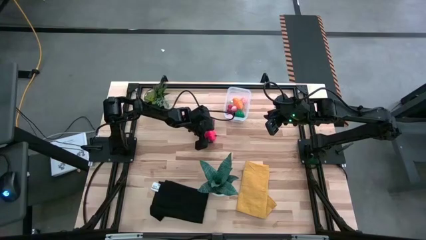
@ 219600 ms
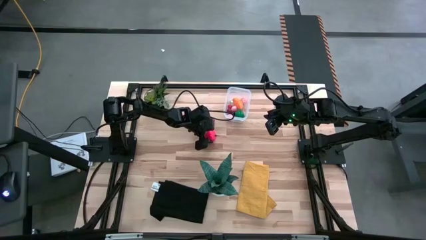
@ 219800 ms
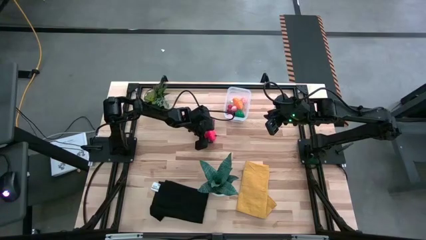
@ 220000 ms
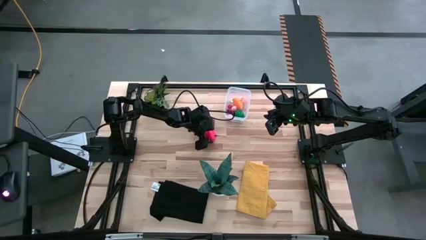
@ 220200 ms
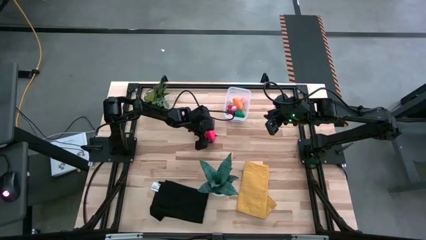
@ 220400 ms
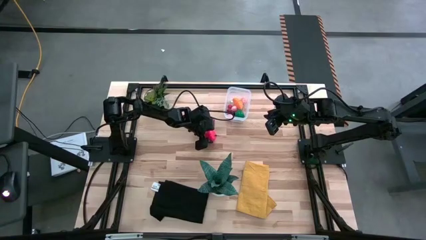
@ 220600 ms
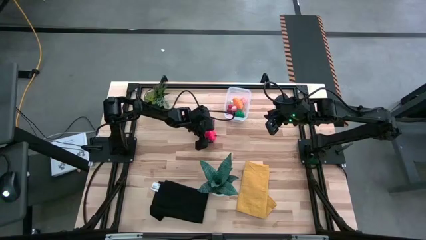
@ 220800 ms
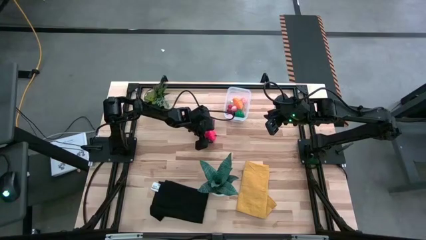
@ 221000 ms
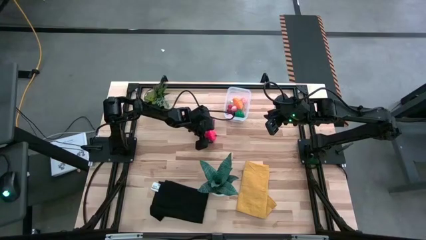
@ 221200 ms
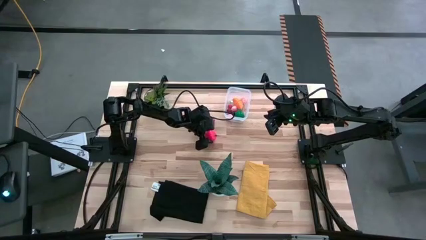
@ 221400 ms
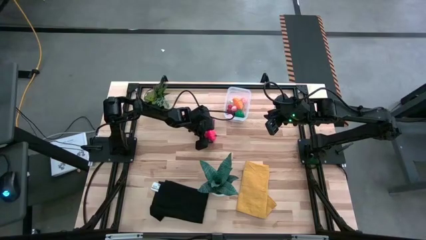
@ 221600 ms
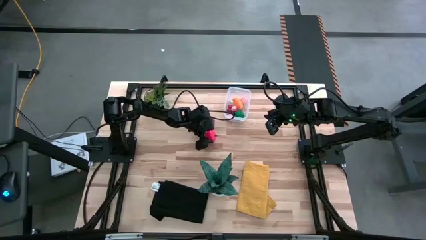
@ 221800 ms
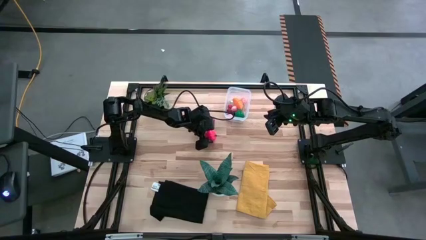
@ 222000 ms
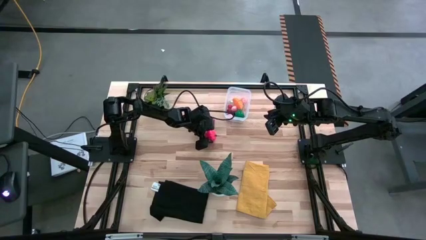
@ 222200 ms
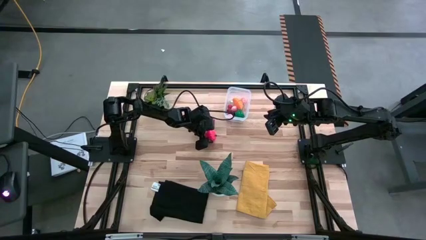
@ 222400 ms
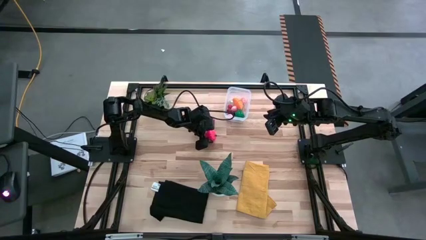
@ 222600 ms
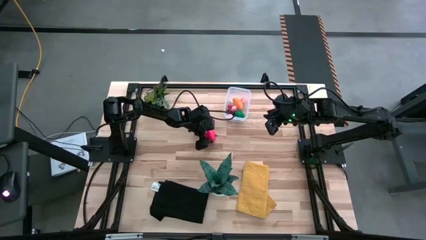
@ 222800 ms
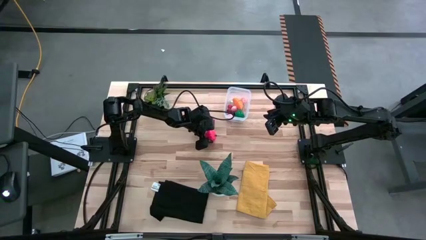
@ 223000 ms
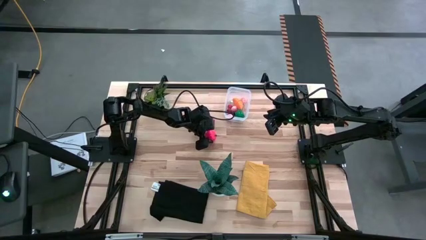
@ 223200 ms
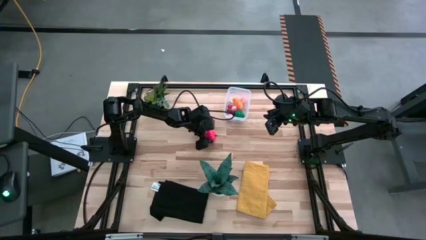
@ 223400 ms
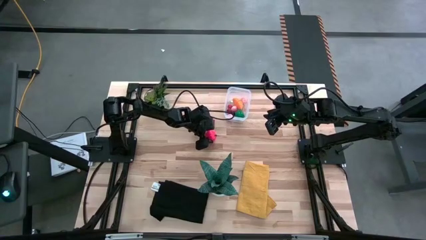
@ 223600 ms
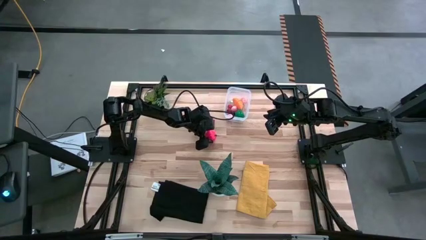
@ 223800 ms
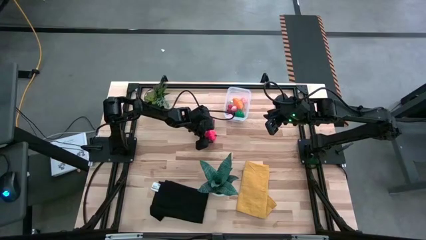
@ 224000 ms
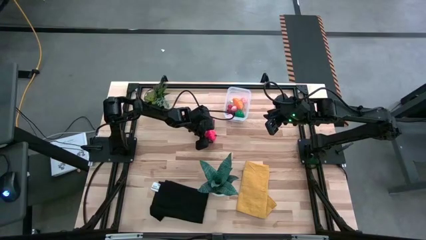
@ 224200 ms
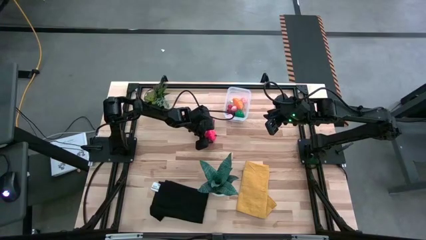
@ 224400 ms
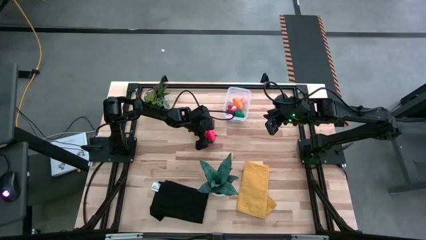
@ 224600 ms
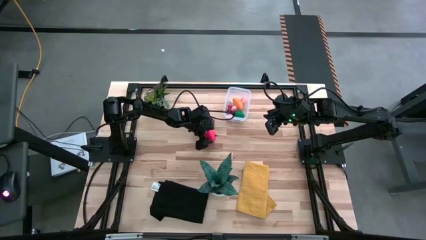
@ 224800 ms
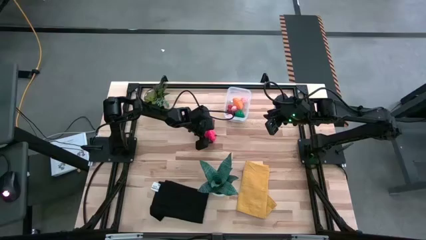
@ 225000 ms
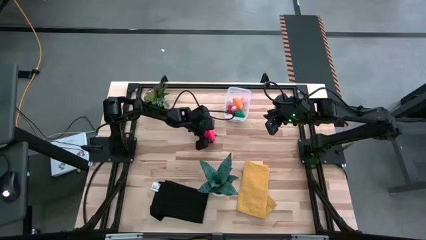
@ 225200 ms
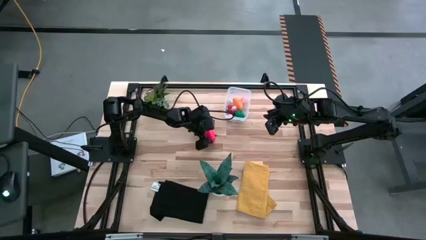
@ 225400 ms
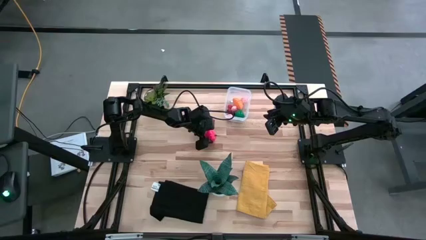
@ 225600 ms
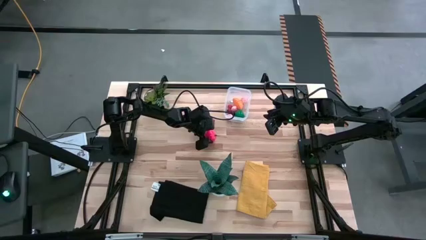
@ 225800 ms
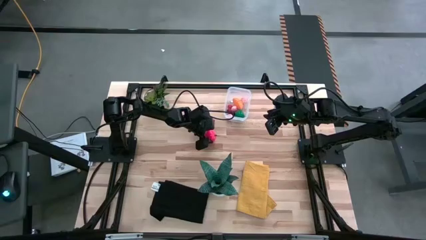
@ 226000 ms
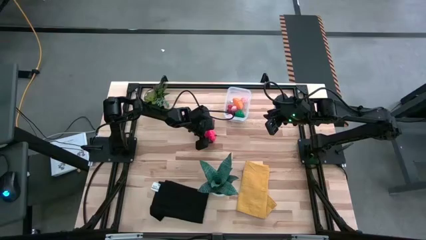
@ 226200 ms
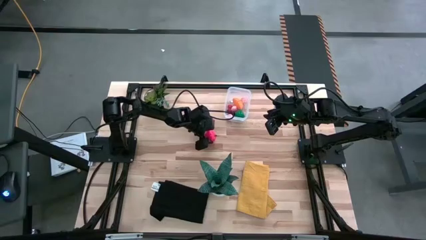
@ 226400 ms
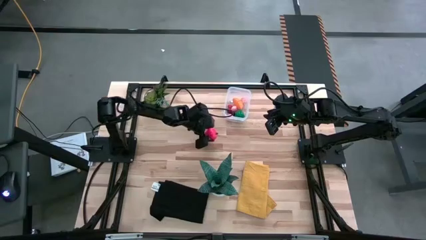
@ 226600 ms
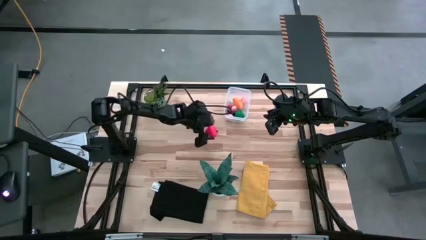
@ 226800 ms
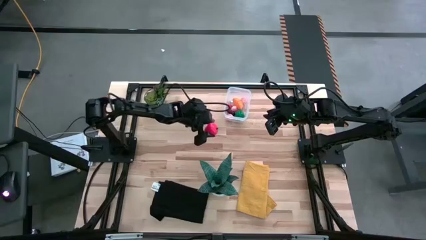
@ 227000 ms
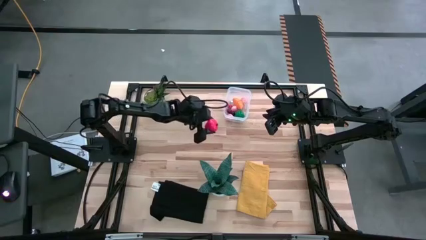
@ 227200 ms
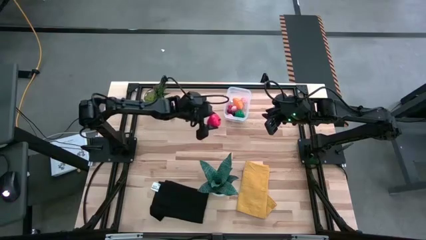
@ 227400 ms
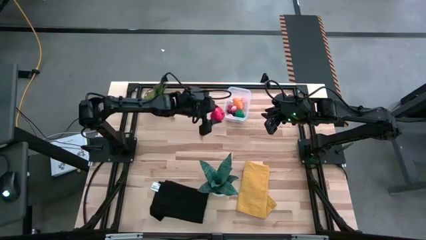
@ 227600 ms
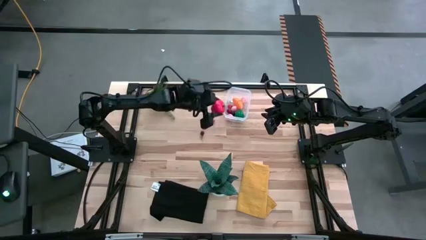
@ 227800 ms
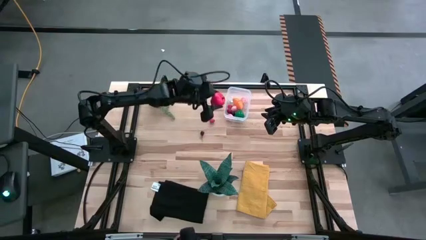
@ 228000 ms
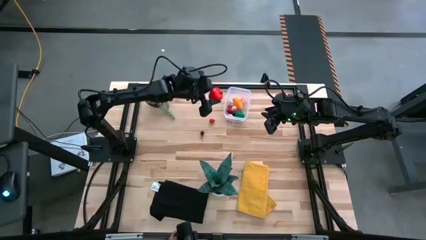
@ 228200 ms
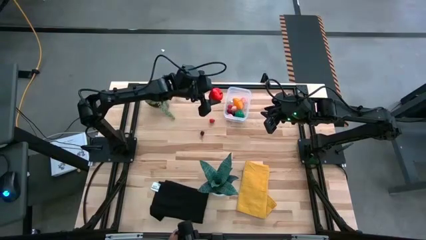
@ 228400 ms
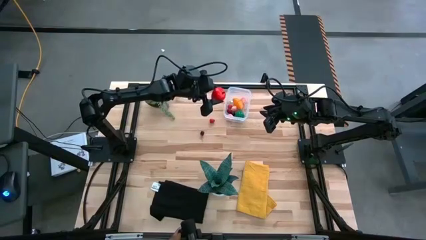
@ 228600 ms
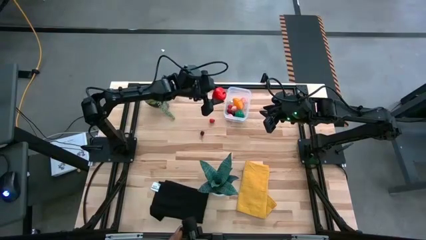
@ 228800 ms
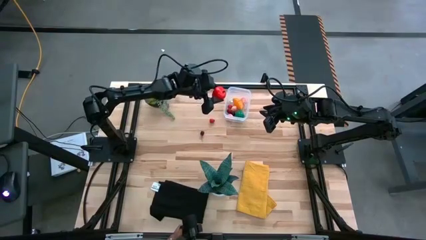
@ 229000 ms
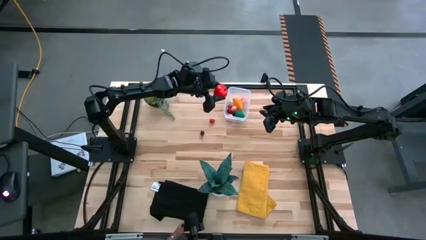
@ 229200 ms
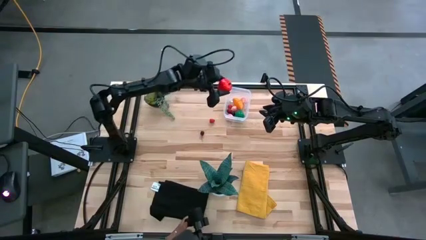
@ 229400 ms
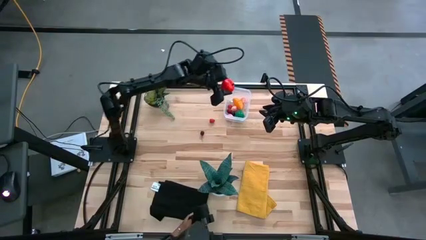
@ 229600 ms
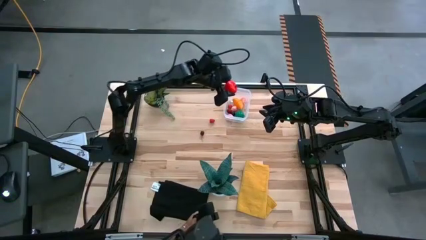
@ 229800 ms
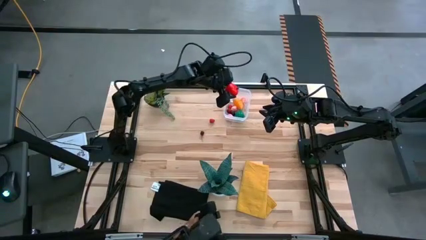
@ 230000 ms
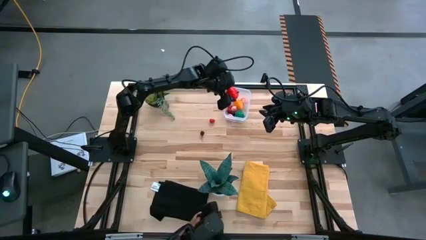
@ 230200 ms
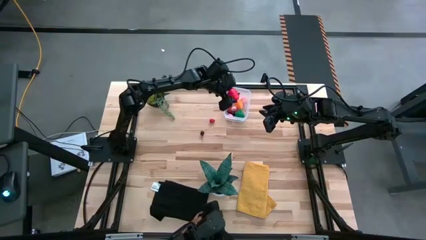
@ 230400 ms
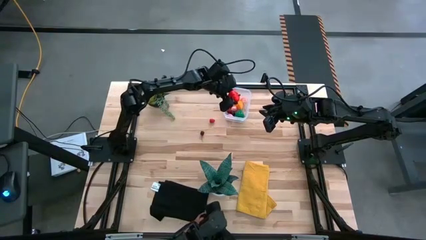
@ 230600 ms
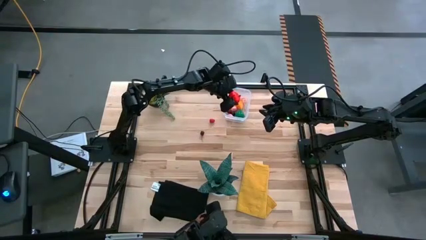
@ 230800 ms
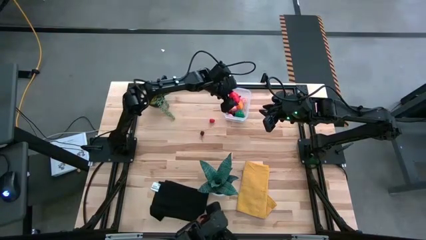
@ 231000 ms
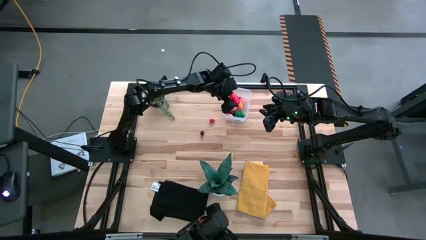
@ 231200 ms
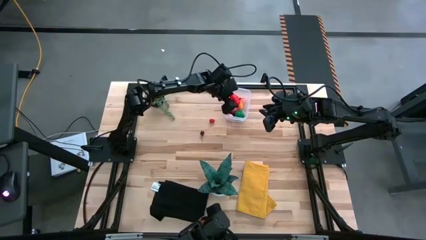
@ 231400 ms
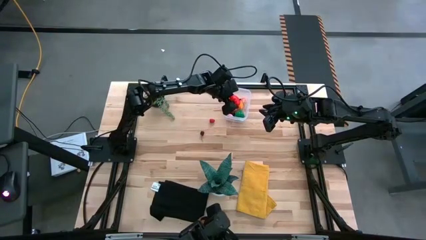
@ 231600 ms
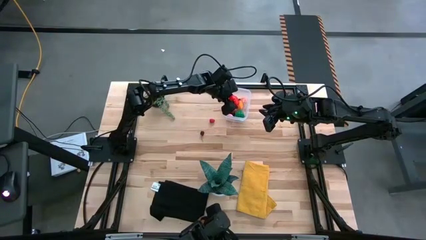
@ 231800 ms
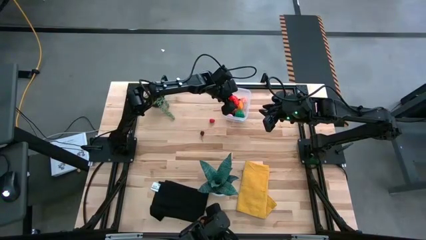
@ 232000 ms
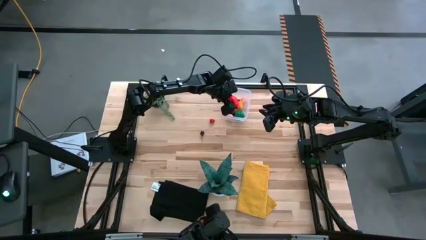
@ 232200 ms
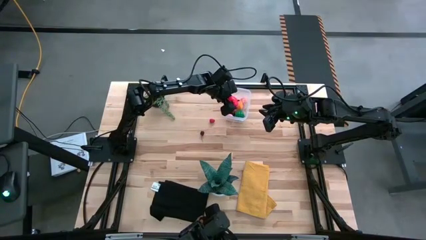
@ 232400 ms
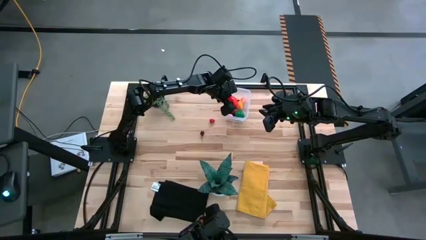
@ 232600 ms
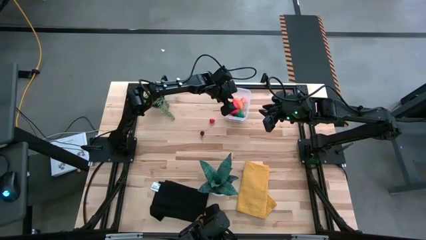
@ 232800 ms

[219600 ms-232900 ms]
Task: Pick and placing Produce into tupperware
Put the apple into the transparent container

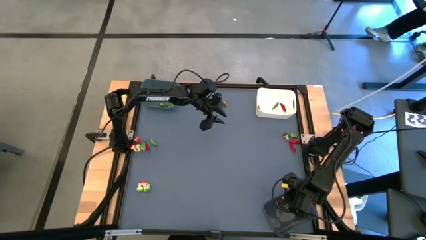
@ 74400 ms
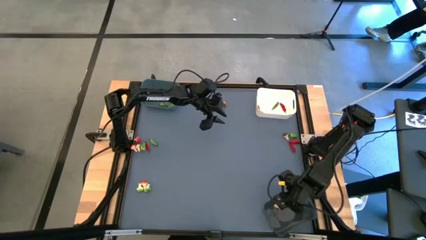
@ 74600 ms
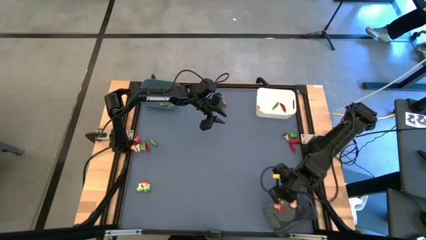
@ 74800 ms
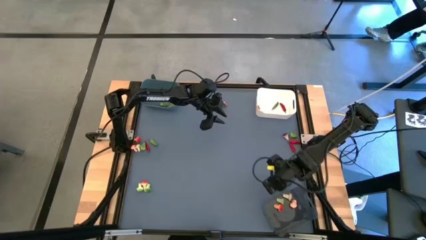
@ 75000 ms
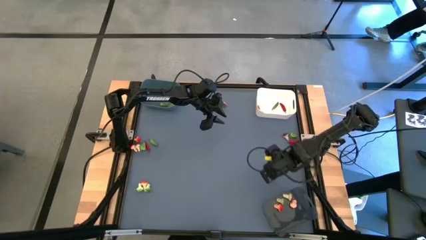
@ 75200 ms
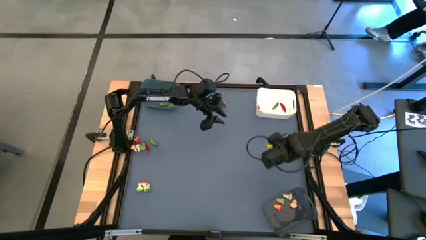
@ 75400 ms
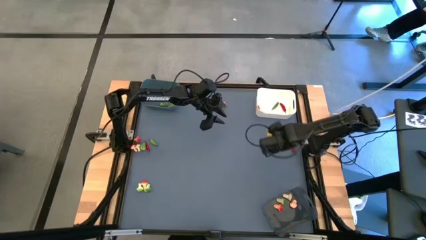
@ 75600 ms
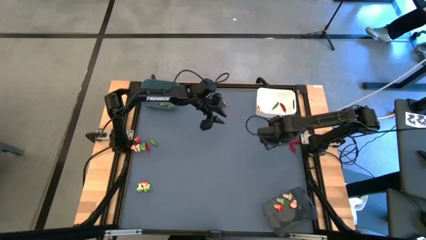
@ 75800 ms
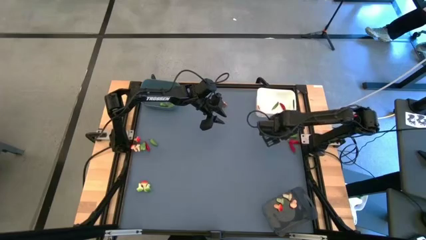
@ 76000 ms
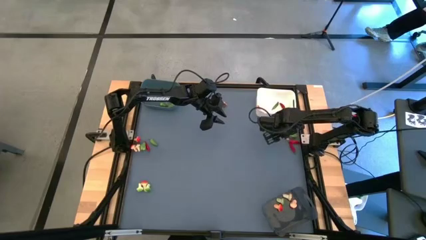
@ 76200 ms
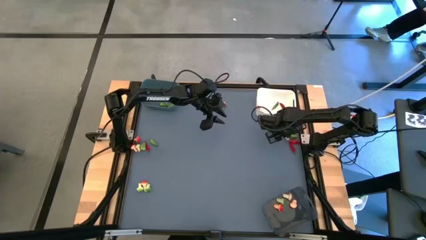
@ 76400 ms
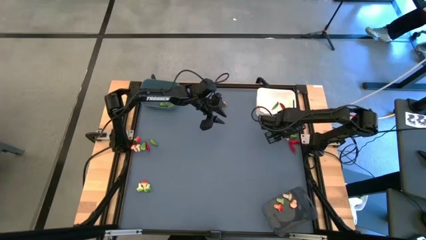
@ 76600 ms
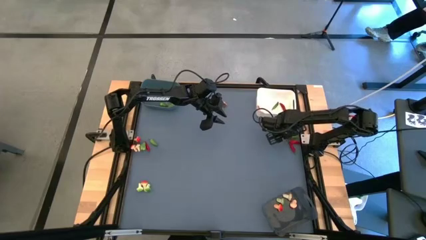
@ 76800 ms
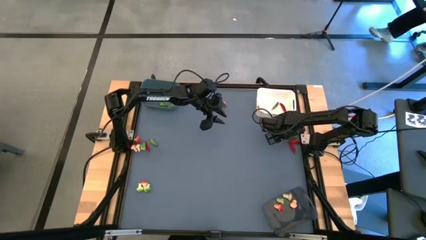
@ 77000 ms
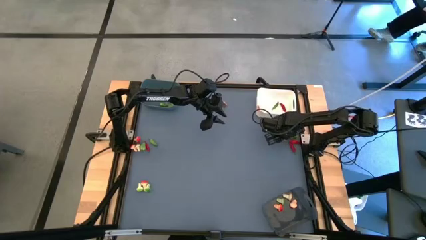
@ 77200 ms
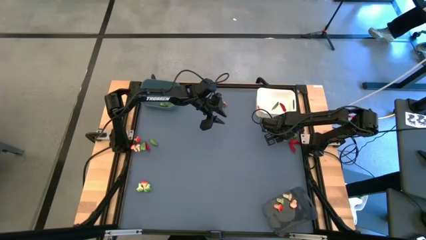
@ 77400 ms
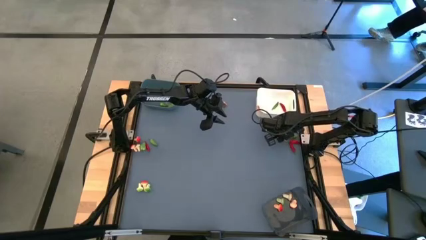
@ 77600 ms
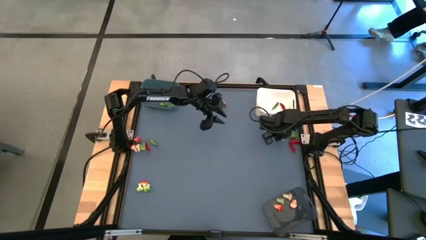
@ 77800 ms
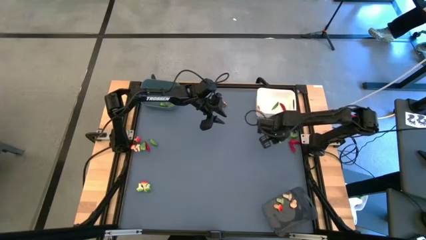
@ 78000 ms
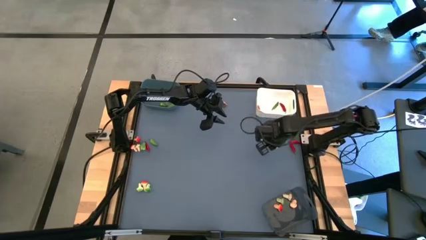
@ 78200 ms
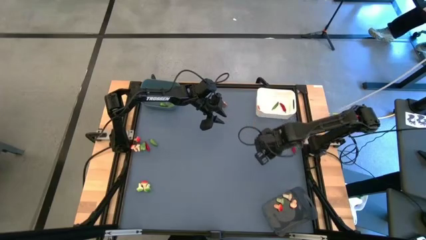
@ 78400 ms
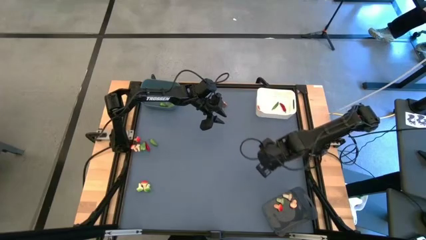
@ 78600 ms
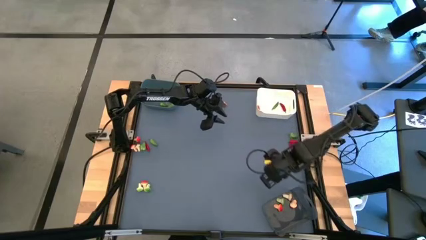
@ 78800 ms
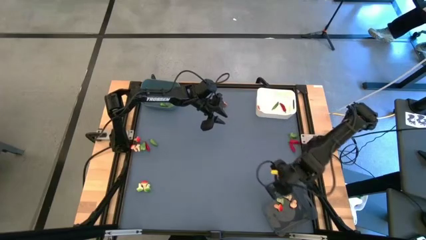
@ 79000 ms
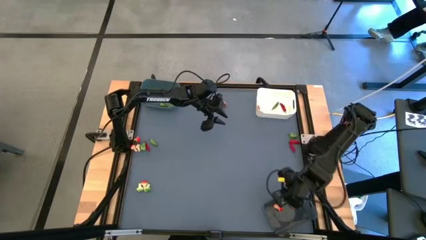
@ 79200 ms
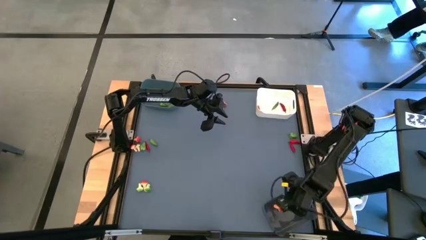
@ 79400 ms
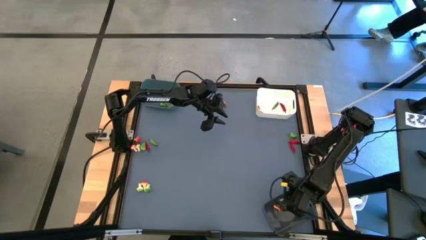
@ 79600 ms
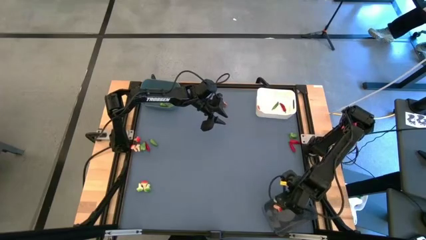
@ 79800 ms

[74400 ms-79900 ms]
Task: Sort produce into baskets
Put the brown mushroom into the black bin
